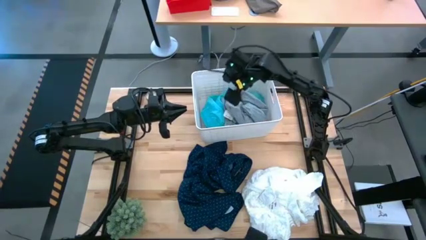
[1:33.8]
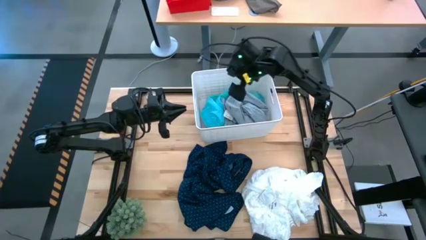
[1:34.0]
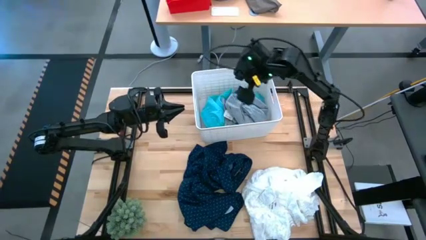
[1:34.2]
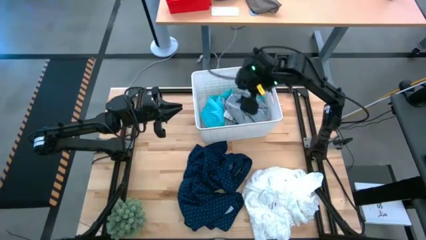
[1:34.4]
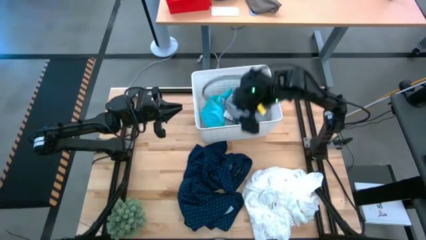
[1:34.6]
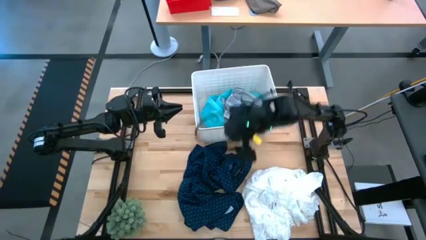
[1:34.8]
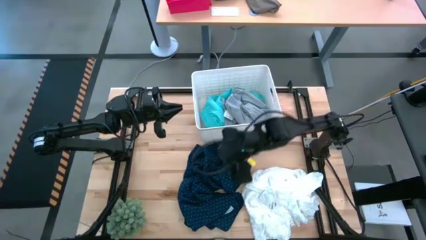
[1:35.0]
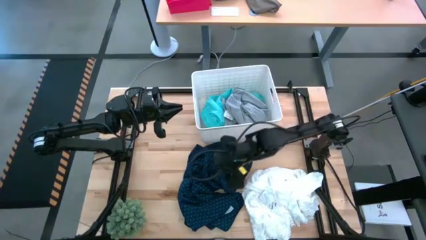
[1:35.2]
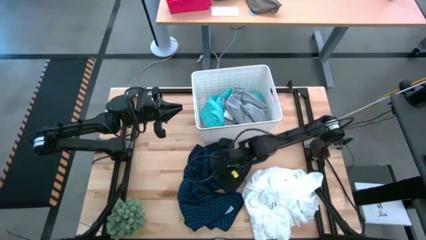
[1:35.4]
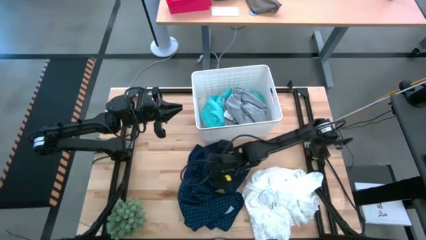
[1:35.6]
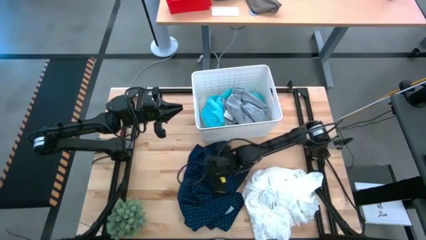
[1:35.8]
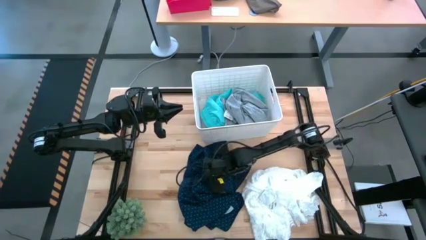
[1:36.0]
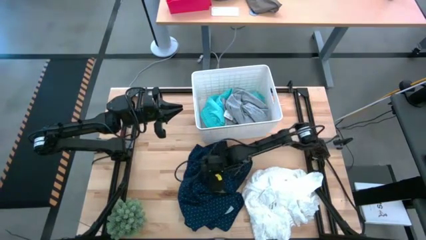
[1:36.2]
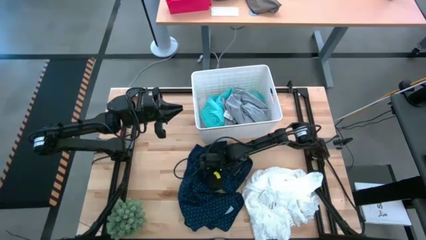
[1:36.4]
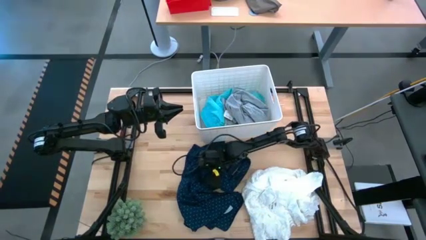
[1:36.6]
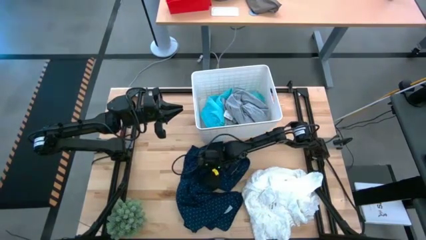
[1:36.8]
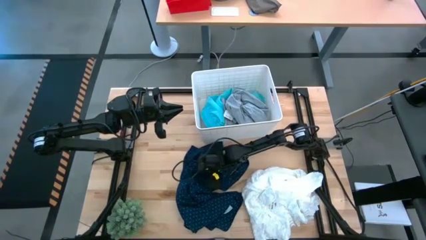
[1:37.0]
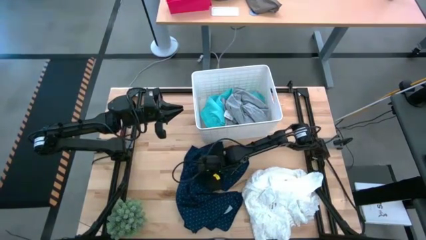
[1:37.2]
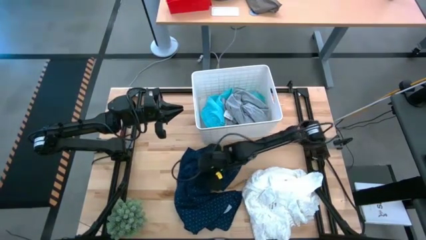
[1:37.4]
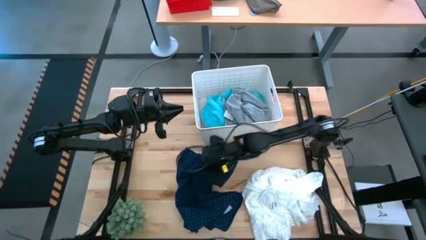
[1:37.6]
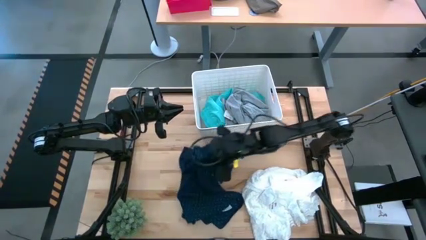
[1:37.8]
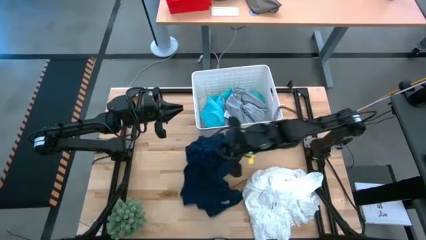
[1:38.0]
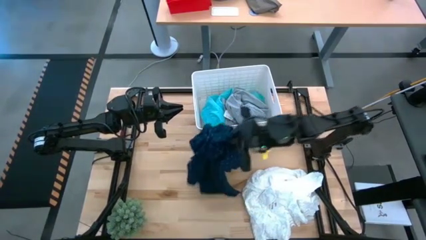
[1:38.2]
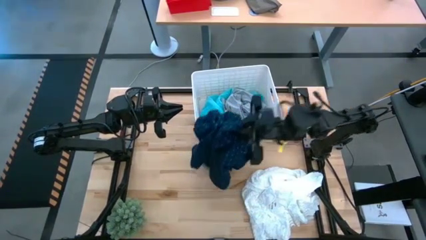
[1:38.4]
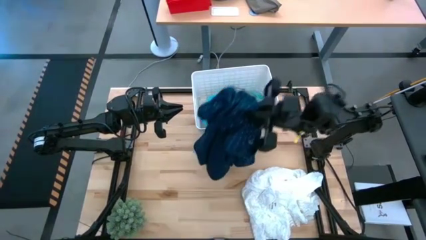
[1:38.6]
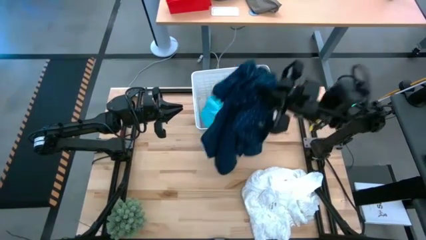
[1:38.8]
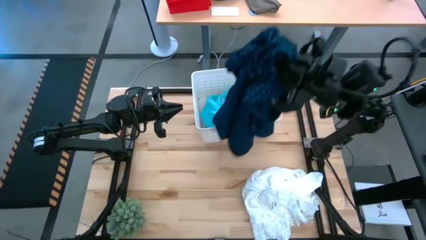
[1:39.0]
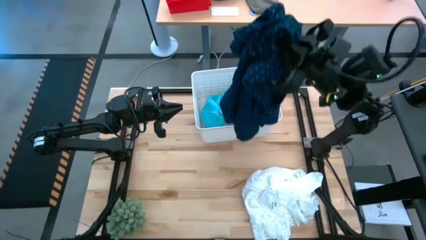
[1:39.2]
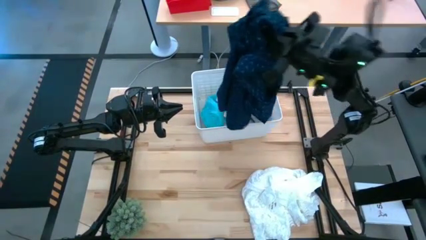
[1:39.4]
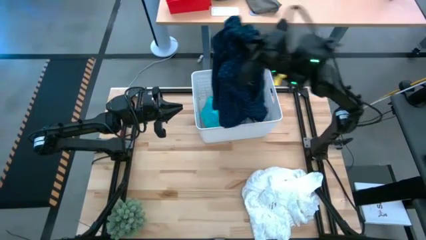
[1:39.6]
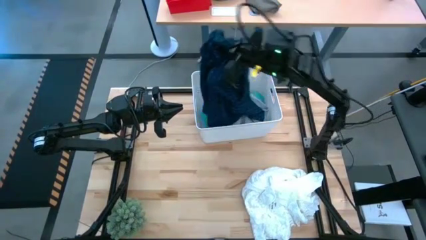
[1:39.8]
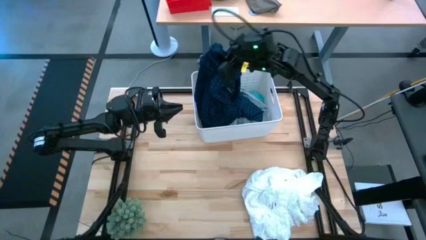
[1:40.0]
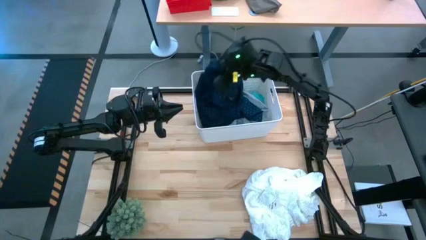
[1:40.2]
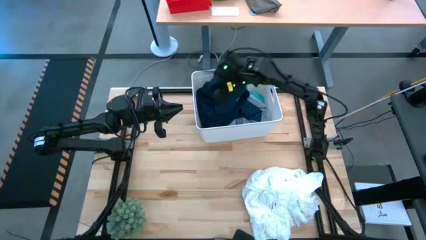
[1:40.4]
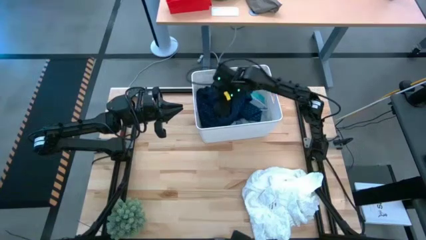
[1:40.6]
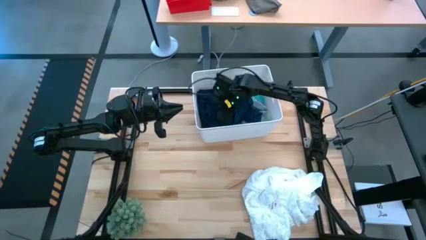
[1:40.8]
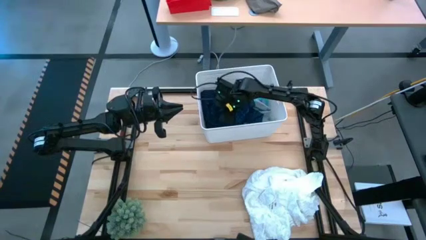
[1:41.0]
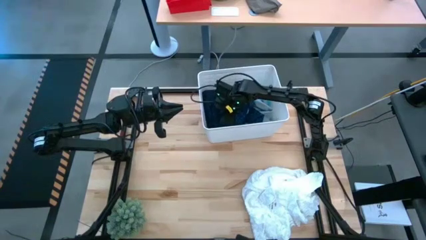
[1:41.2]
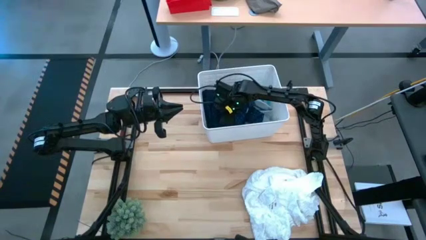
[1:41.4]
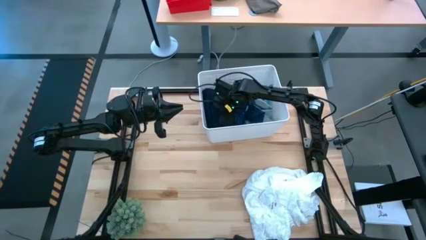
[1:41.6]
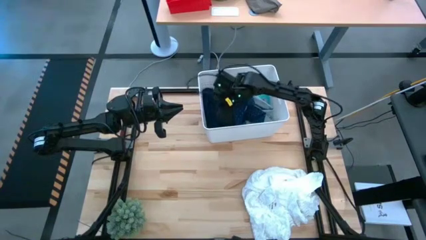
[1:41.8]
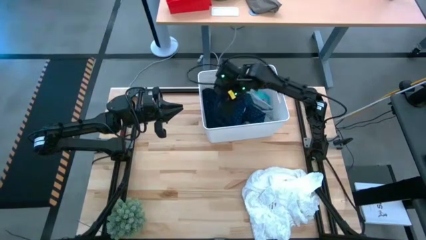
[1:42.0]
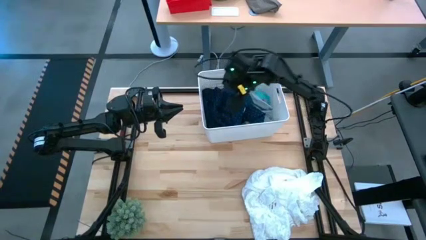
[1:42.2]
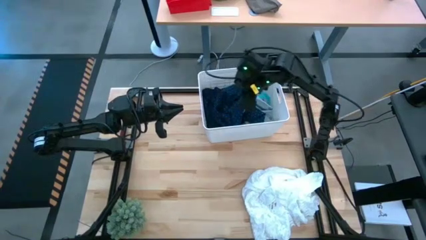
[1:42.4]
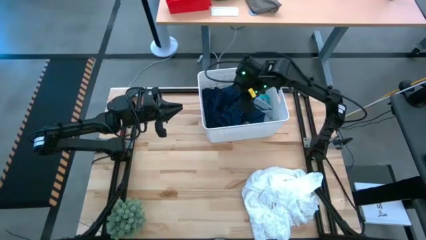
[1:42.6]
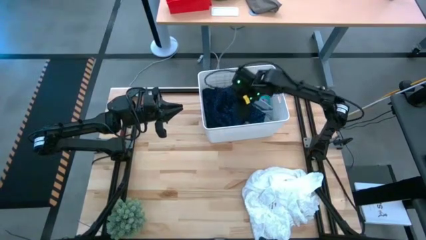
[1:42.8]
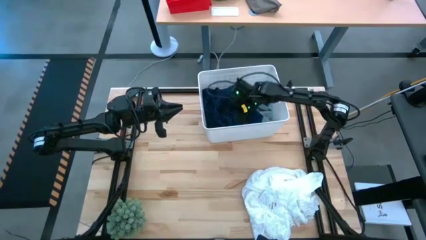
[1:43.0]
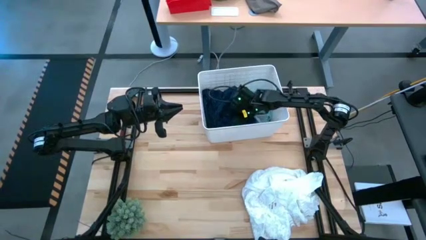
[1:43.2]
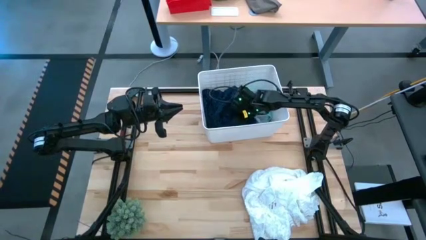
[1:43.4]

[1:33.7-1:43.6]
Task: Sort clothes
Put the blue polo in the bin

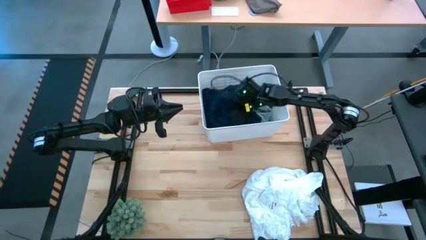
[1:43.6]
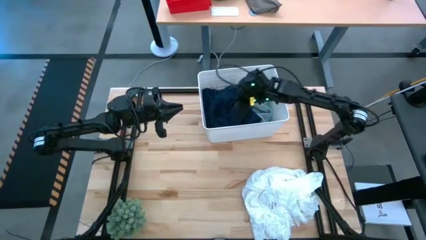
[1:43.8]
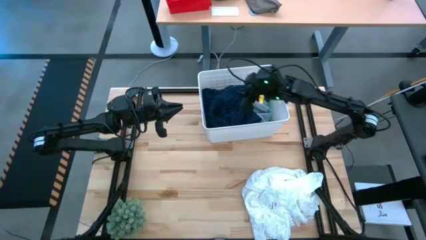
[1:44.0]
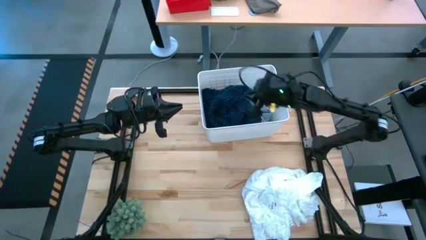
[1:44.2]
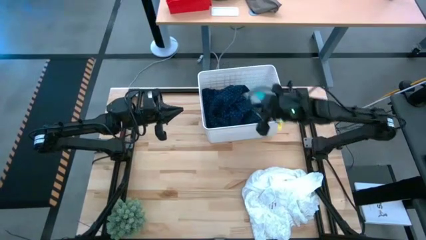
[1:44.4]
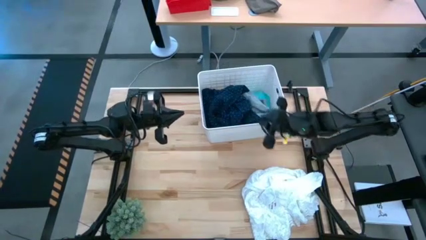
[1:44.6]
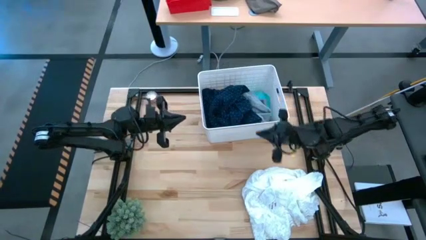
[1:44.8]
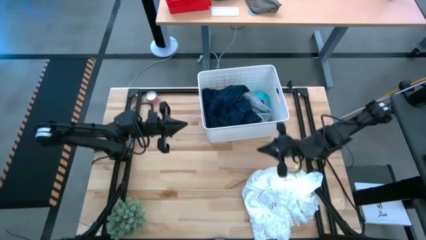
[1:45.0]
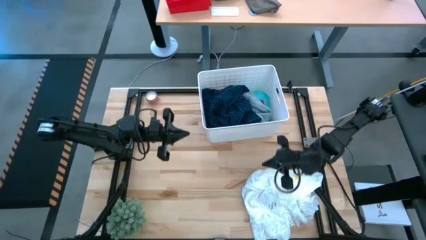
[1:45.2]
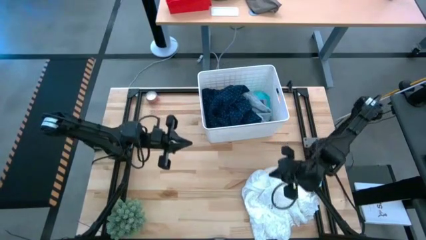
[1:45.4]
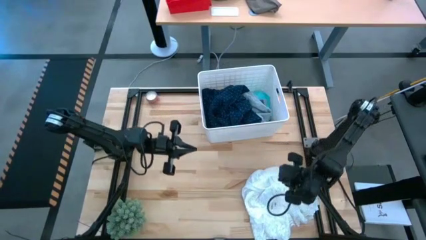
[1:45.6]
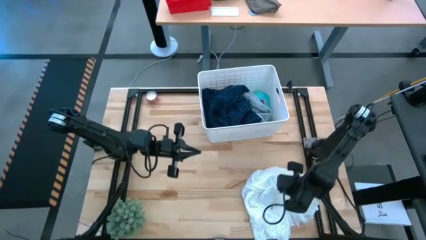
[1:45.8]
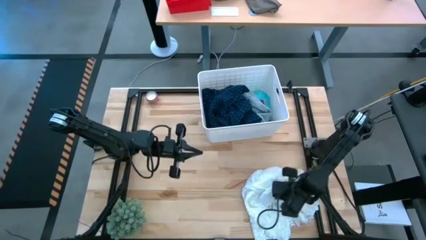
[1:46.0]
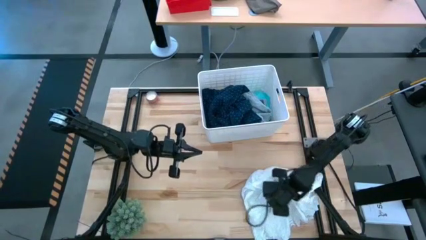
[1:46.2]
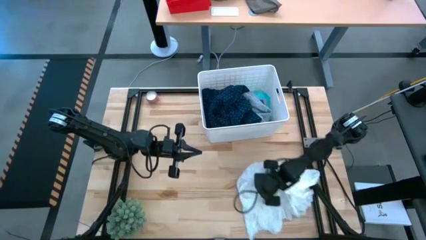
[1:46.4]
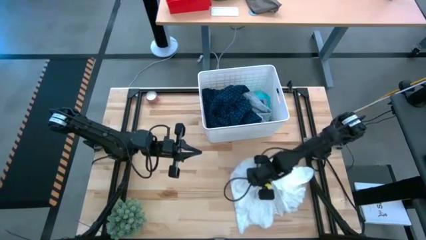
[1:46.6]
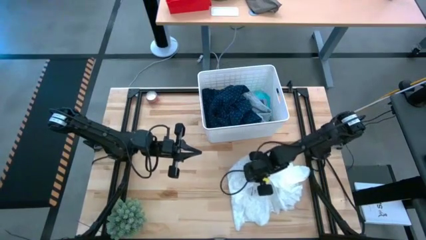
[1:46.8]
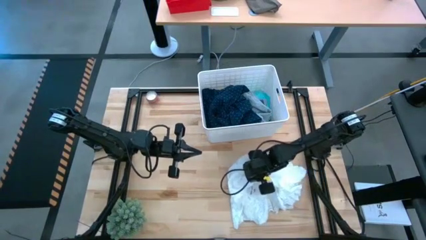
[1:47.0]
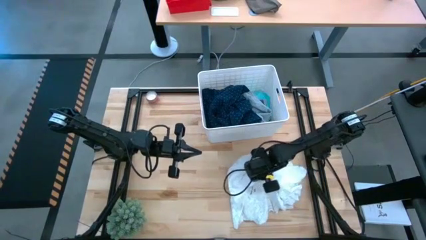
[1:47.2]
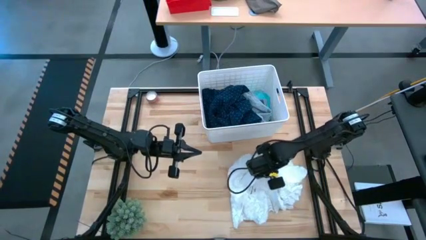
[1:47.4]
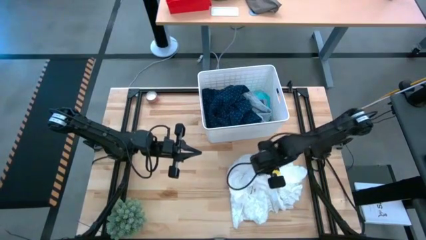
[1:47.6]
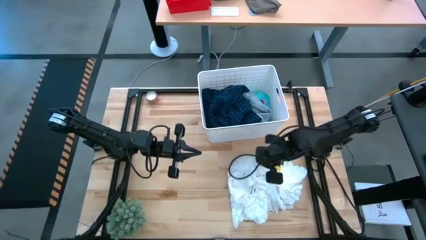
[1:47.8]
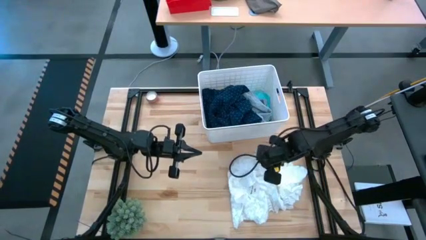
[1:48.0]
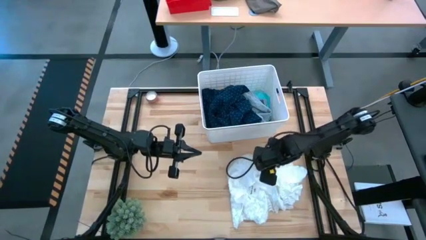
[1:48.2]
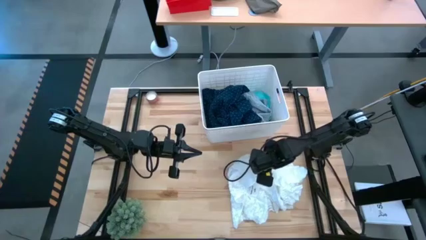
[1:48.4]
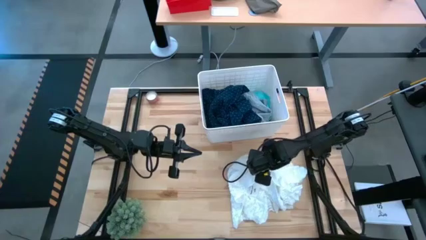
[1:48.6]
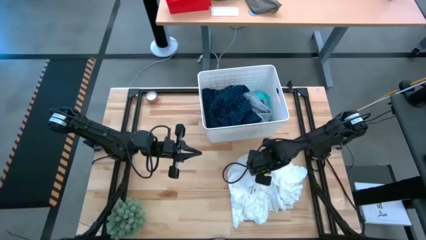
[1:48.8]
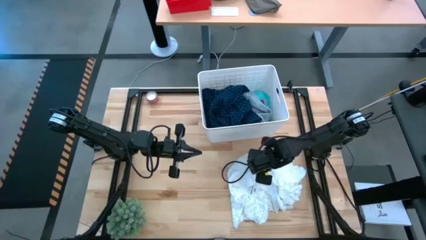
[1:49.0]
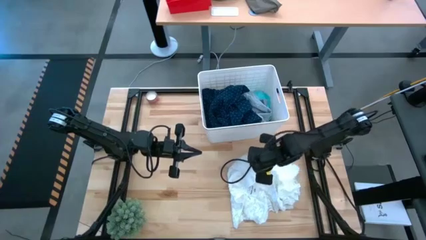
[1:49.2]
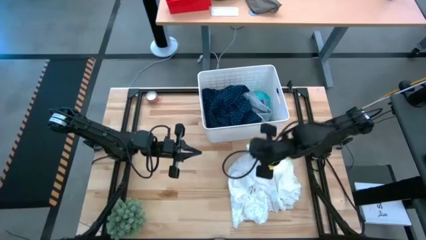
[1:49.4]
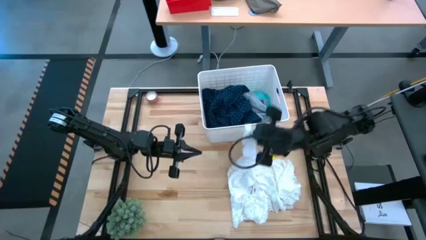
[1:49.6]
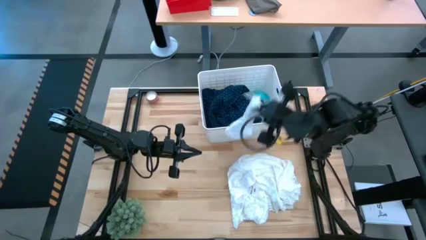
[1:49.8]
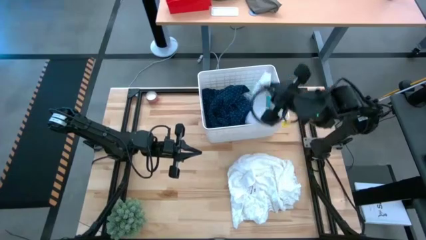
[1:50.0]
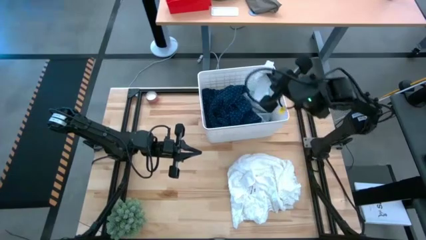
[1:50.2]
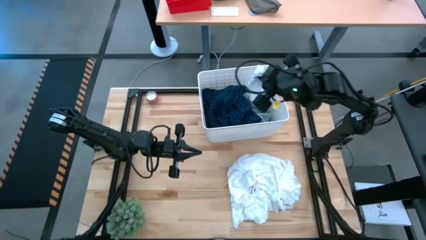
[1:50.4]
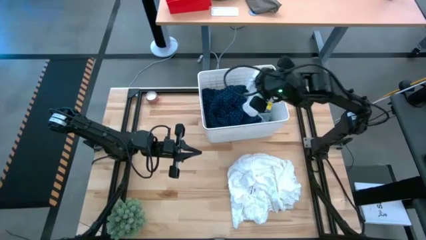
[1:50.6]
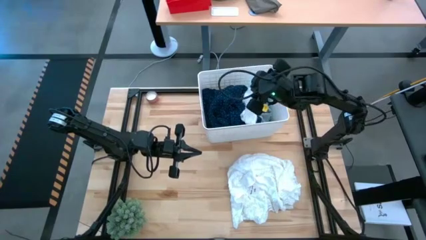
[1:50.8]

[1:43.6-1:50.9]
Put the right white sock in the bin
